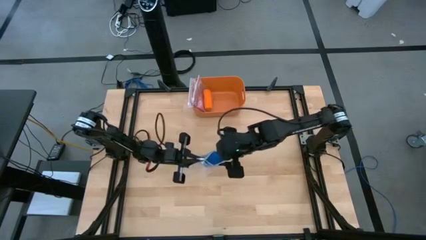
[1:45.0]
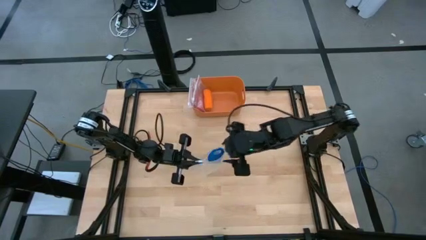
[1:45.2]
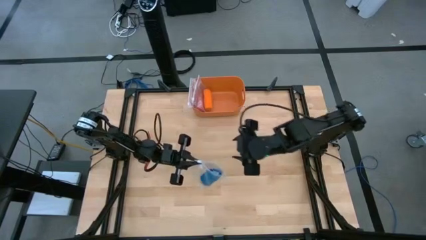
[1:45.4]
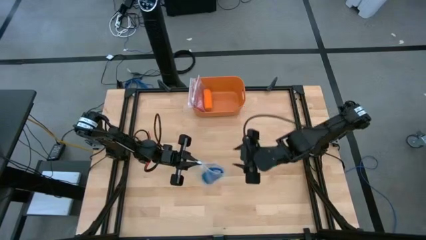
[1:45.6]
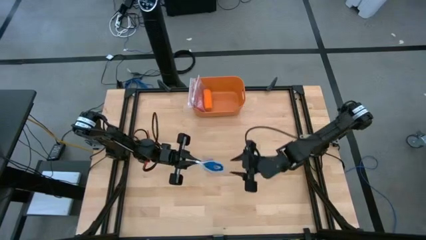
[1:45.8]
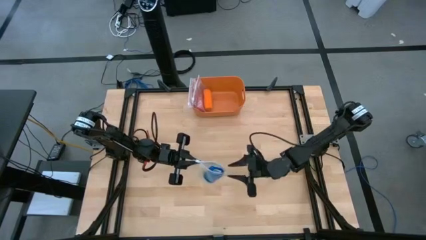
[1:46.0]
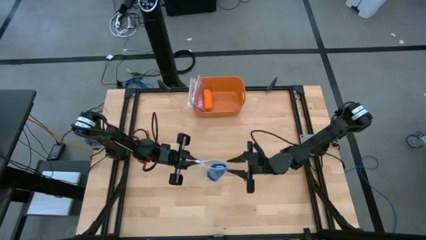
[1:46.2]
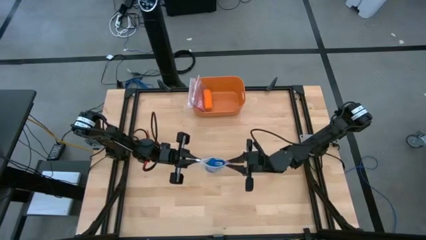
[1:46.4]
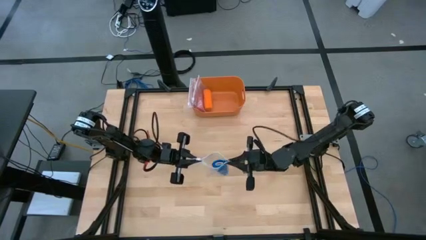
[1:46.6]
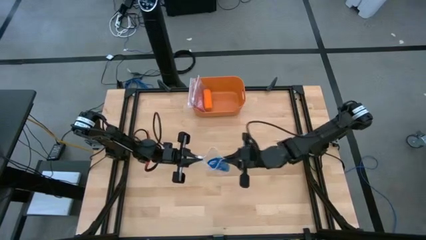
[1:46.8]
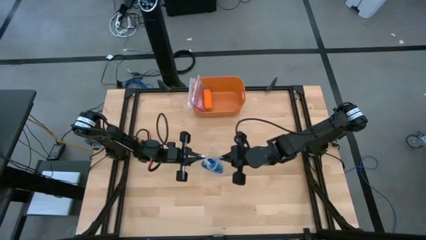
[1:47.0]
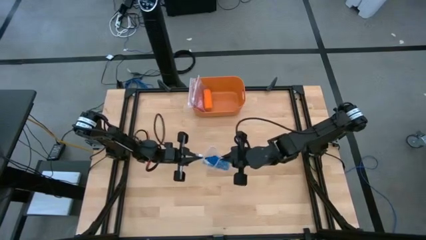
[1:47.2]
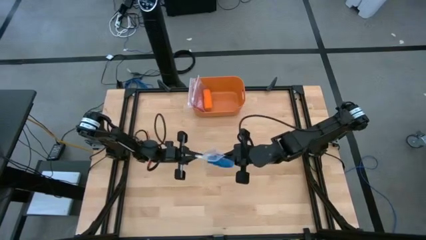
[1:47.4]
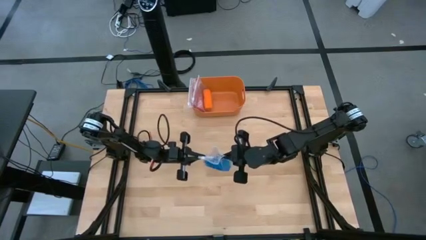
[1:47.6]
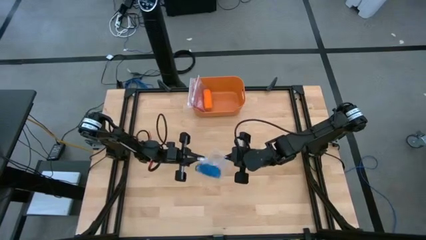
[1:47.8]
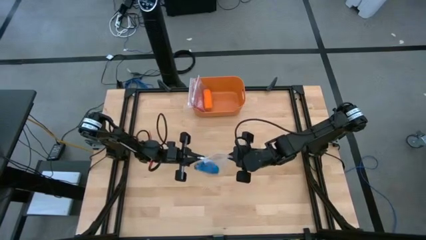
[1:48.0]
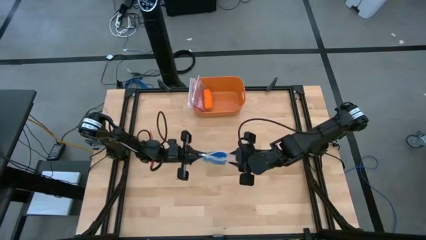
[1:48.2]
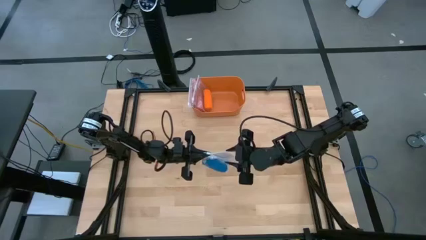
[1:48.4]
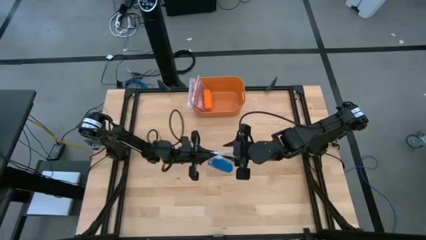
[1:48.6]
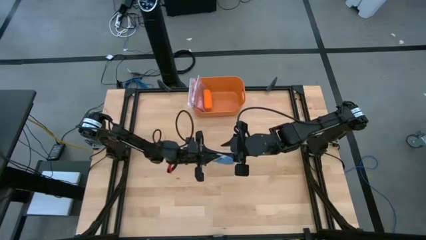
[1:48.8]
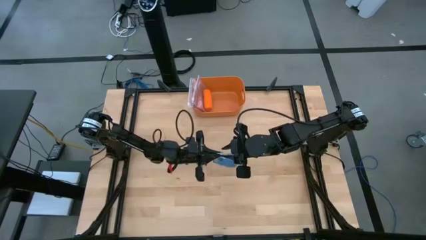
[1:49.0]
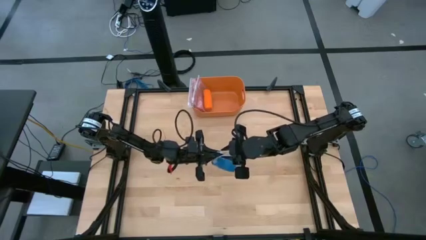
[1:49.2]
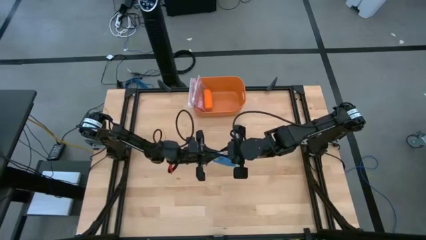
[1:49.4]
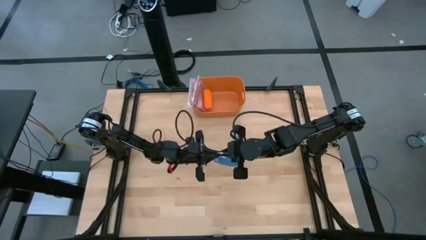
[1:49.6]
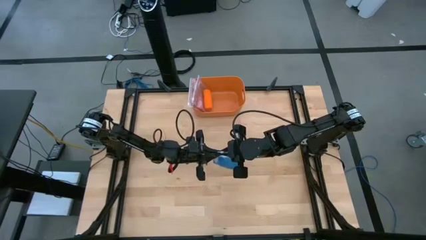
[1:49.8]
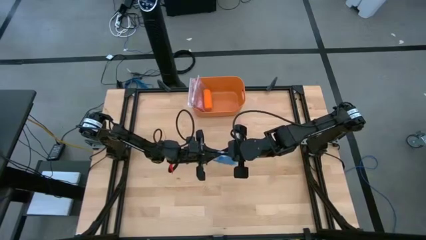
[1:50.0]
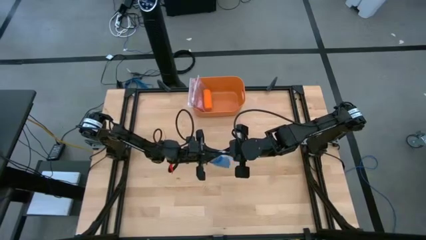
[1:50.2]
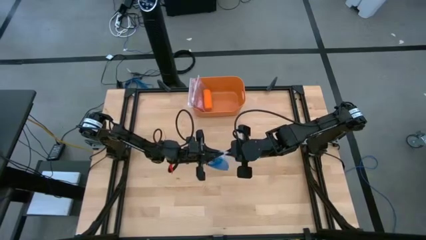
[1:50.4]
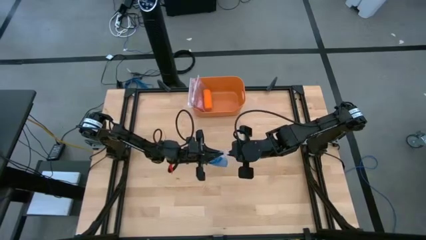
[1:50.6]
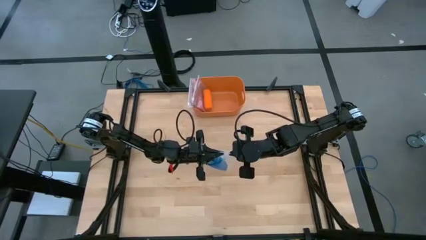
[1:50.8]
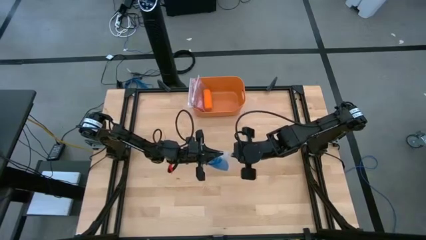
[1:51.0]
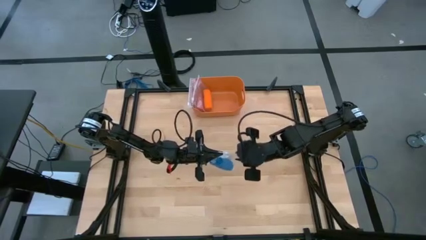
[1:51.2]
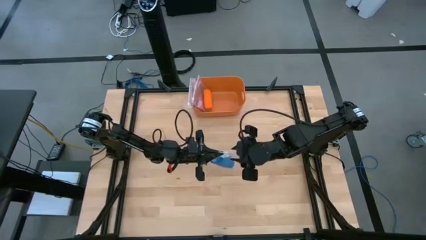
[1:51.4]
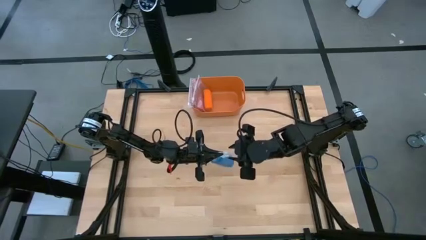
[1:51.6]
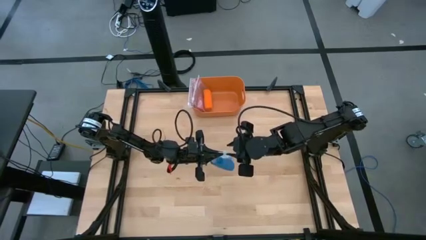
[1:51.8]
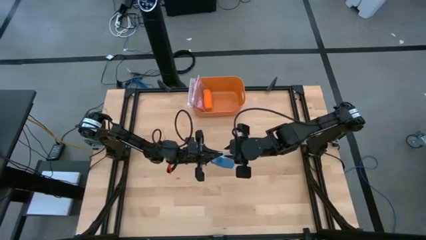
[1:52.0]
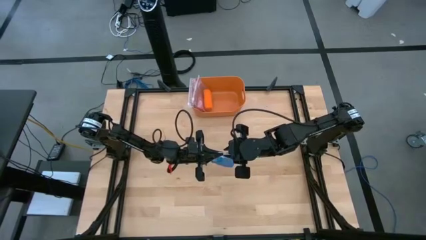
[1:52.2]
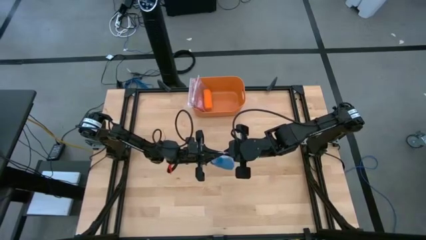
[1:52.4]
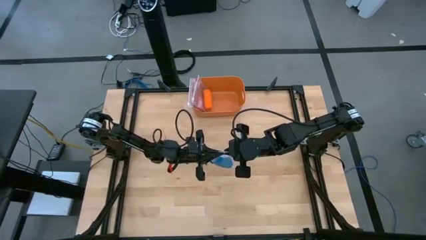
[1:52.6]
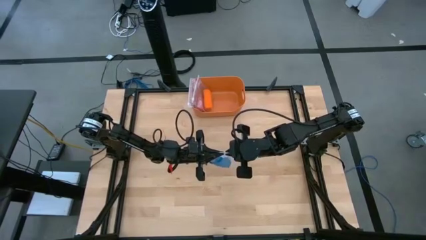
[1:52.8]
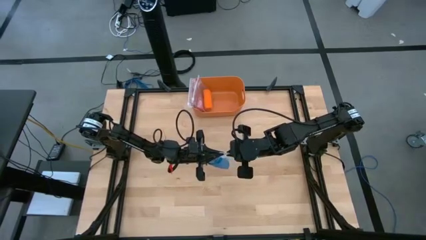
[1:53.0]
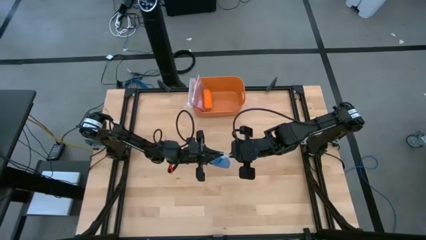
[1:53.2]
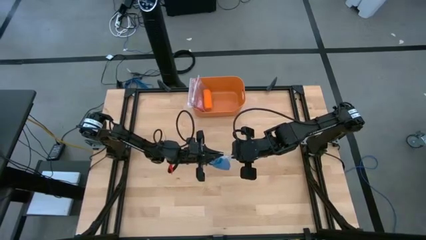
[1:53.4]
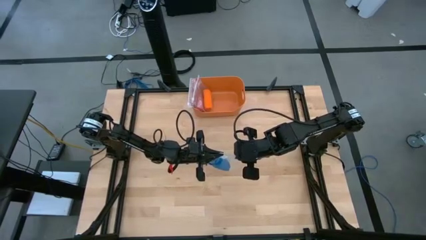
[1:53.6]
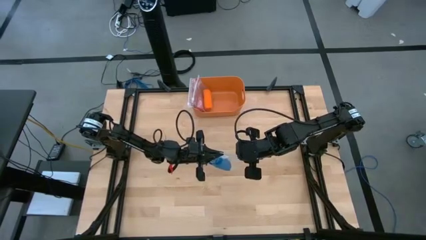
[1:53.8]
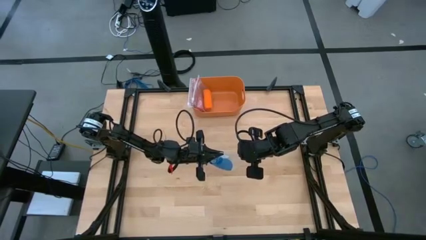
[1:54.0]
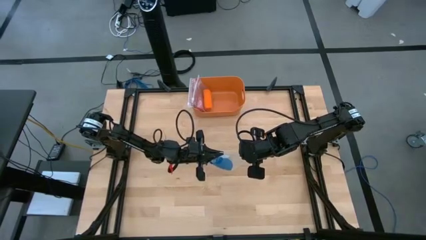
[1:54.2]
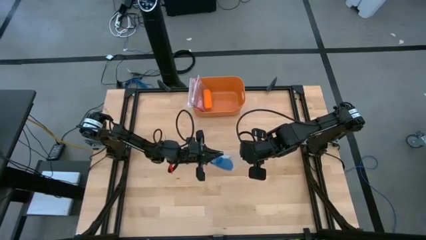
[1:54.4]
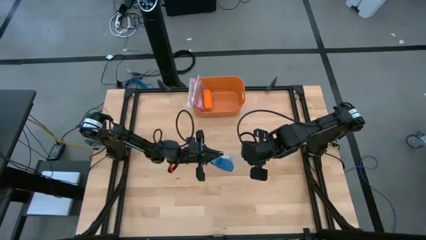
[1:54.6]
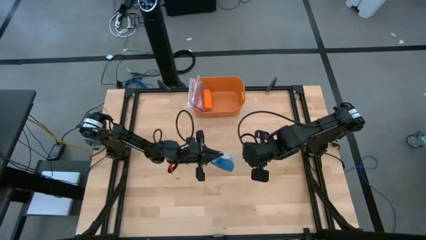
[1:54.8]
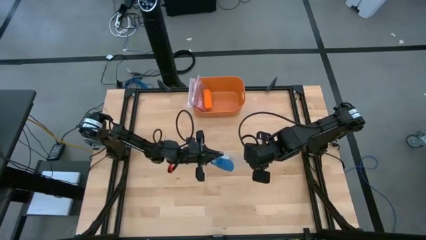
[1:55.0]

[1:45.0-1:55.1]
Task: Roll bandage
Close the transparent zip bag

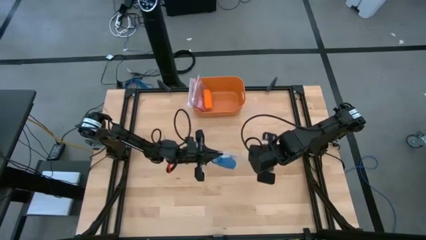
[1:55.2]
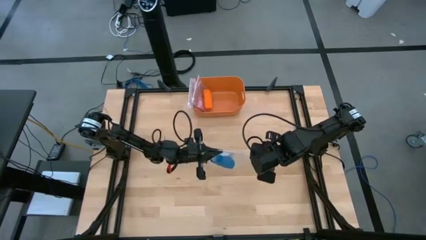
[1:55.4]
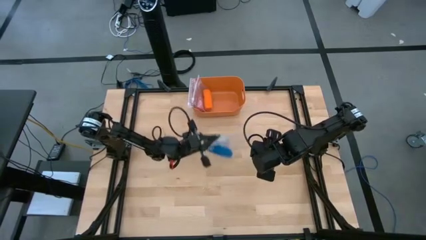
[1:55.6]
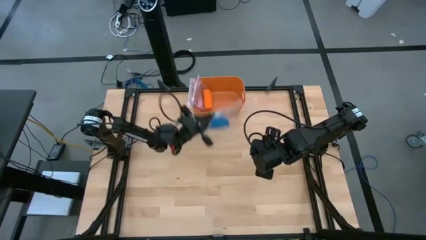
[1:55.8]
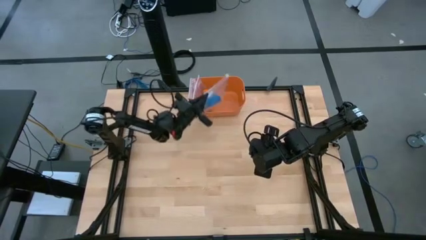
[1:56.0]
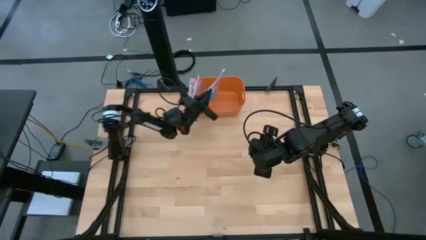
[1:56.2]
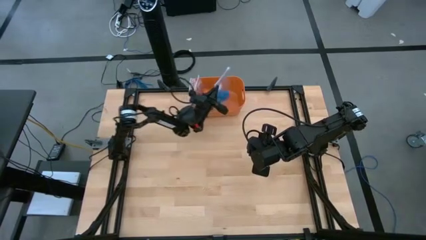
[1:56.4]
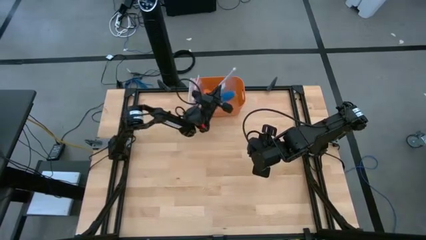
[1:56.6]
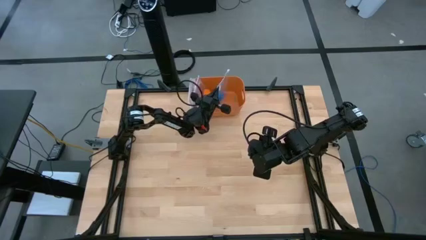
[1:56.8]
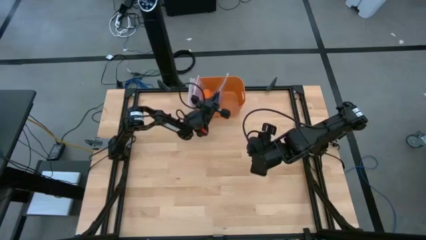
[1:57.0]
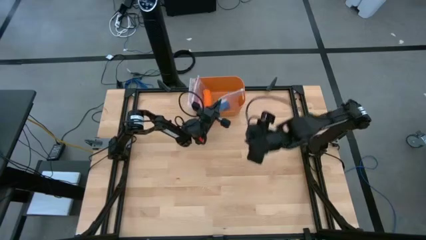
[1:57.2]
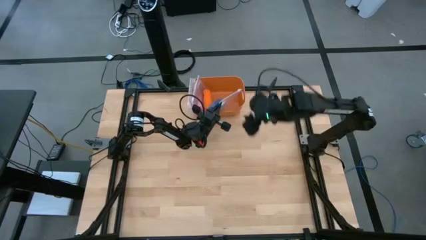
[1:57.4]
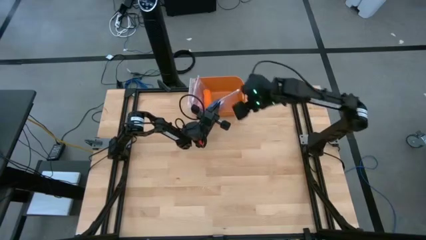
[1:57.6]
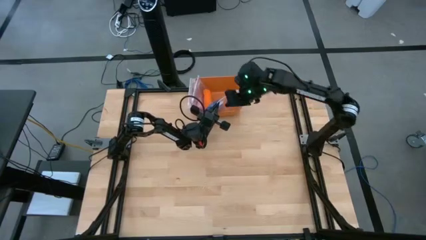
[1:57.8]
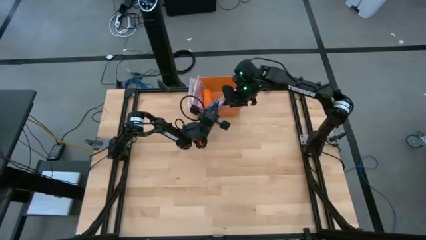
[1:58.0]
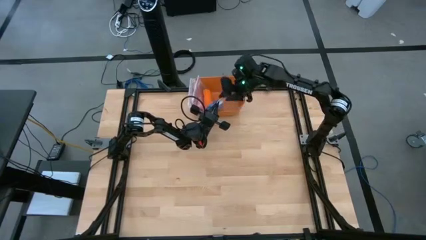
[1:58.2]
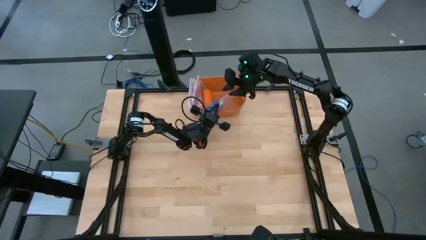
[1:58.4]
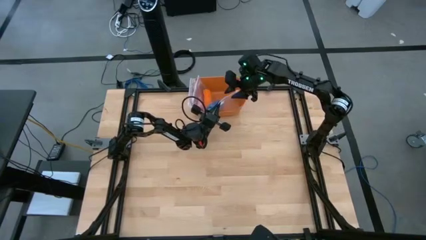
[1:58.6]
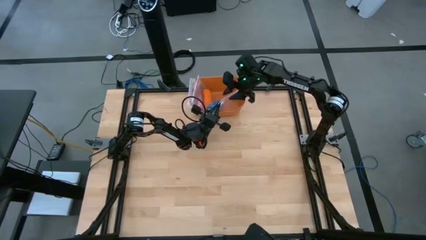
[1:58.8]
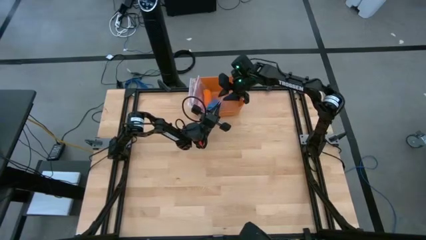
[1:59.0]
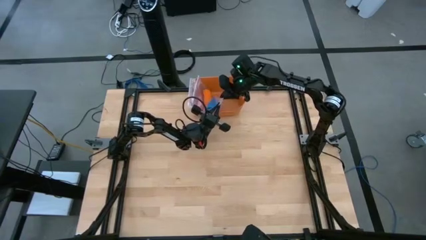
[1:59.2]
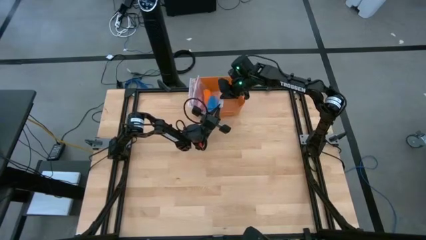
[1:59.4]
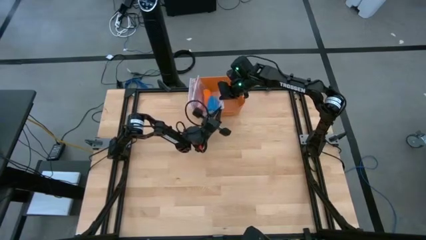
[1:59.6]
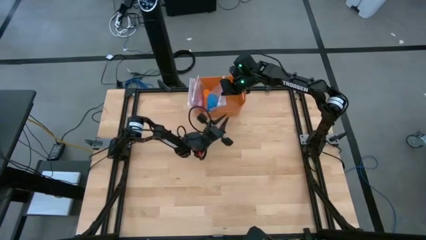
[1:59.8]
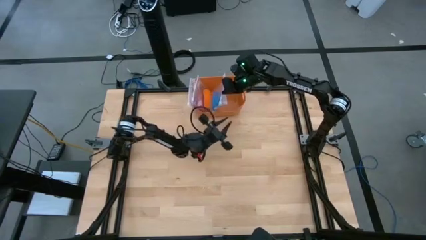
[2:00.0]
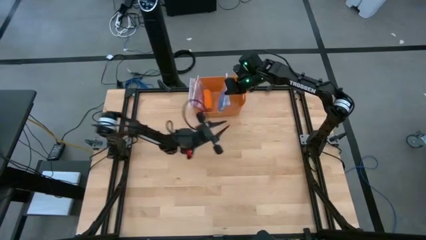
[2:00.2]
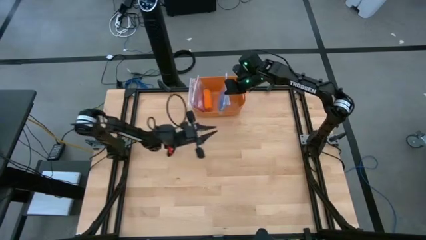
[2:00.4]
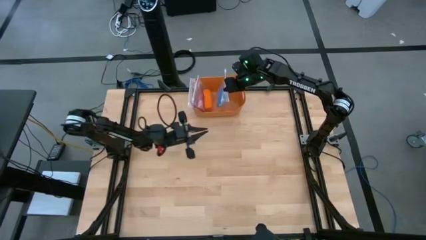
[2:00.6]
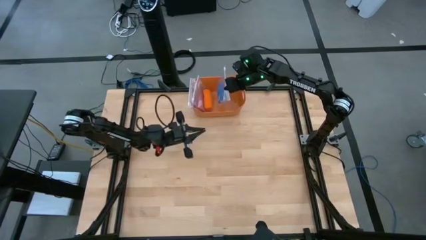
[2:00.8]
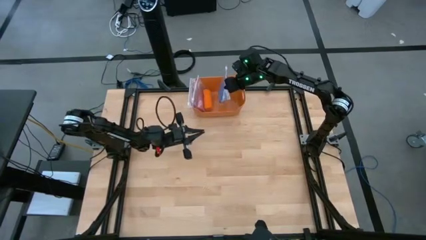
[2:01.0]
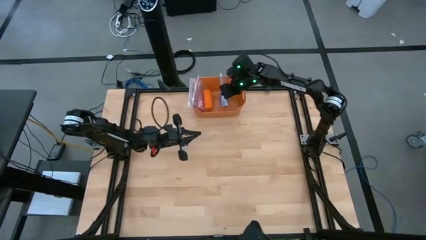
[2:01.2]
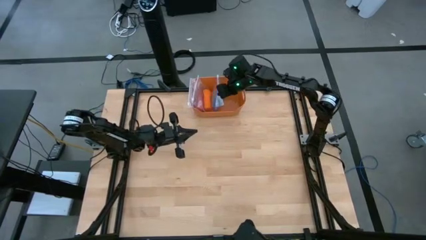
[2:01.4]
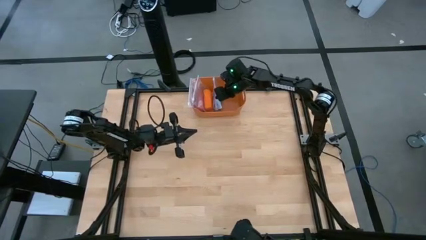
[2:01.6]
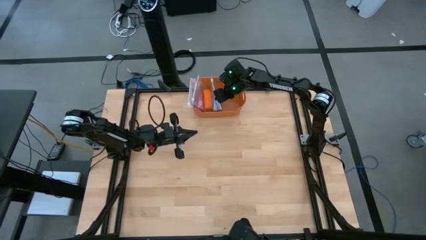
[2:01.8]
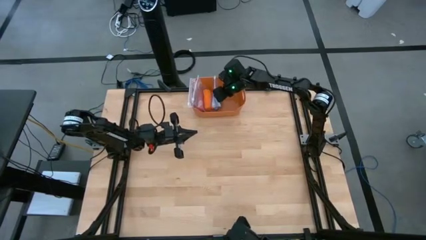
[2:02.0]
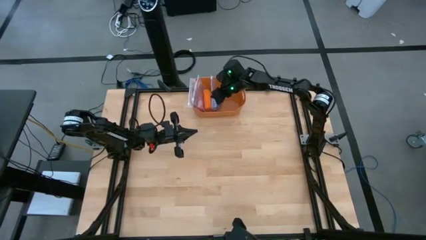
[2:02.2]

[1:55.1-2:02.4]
Put the transparent zip bag into the orange bin
